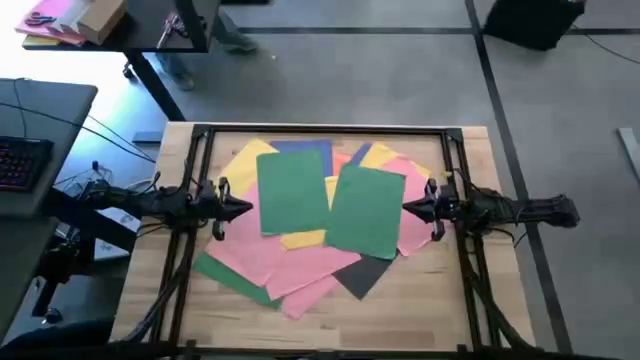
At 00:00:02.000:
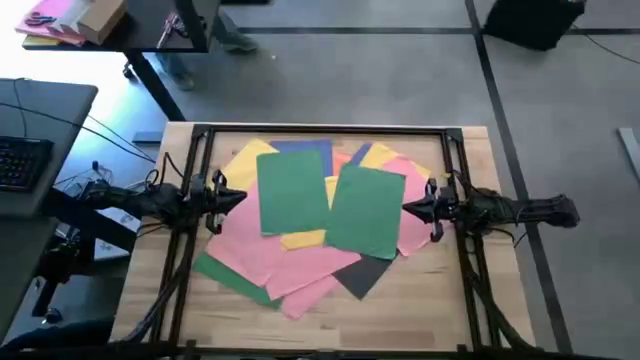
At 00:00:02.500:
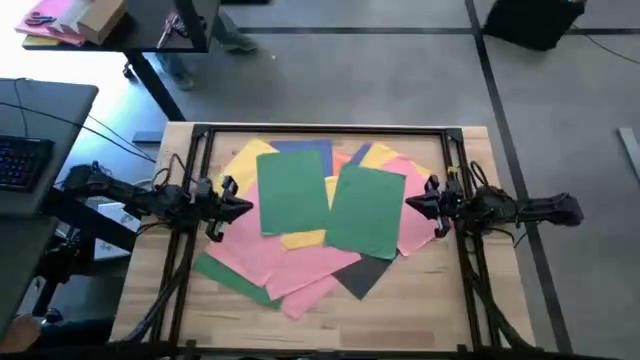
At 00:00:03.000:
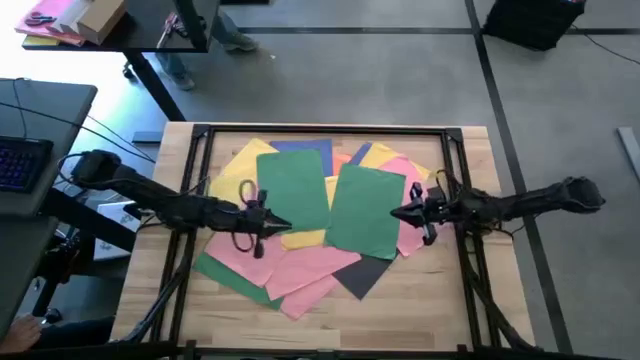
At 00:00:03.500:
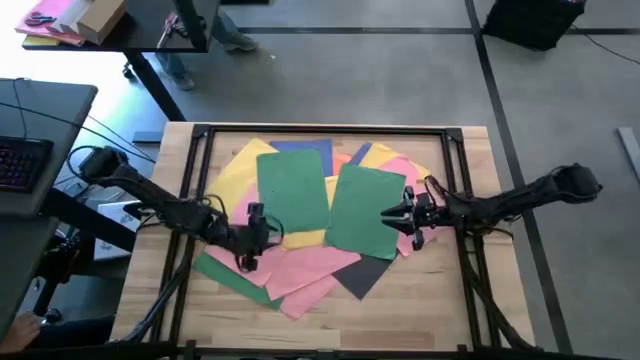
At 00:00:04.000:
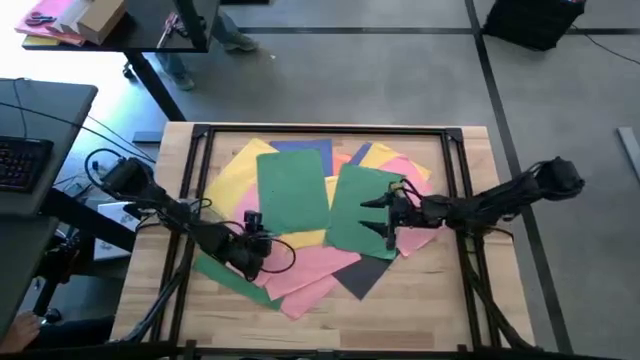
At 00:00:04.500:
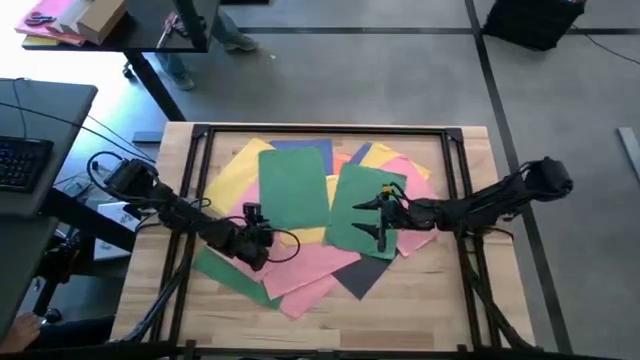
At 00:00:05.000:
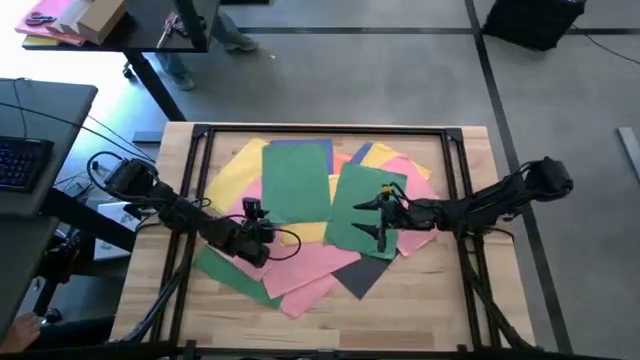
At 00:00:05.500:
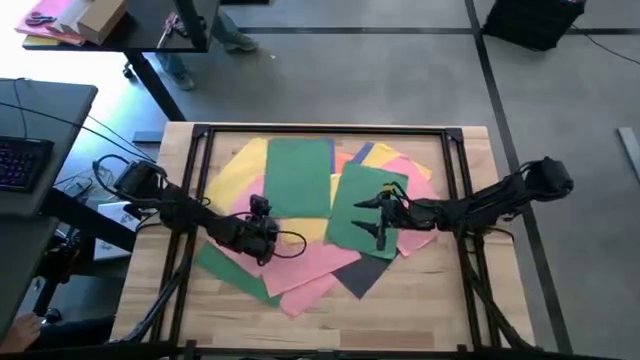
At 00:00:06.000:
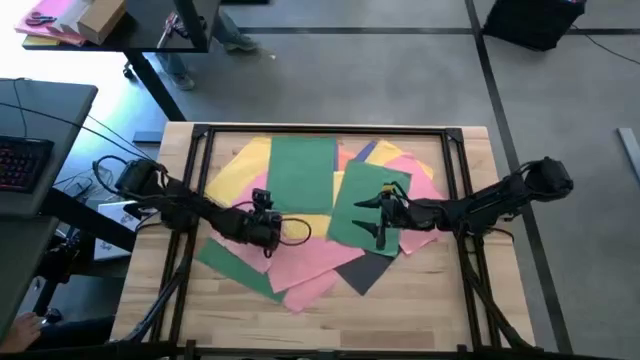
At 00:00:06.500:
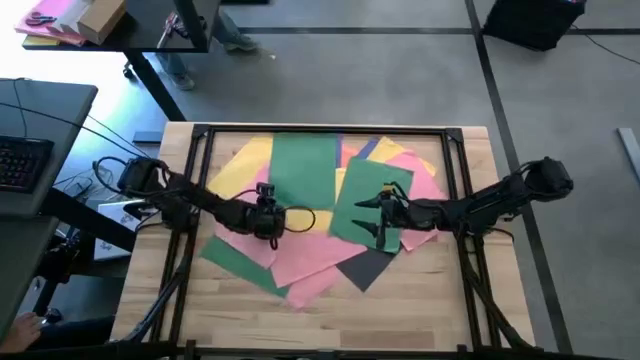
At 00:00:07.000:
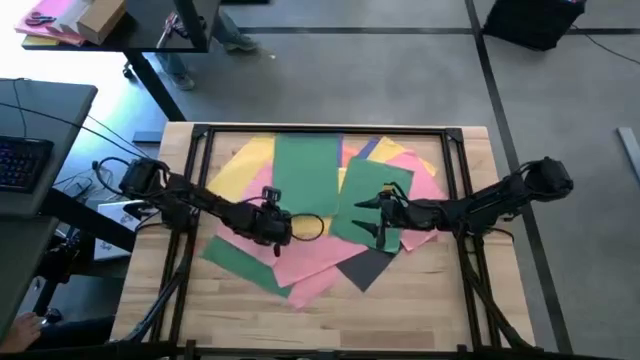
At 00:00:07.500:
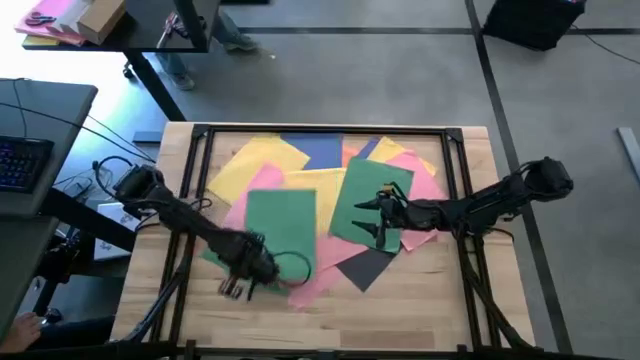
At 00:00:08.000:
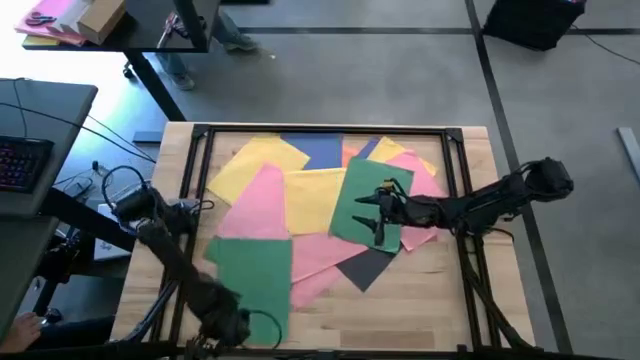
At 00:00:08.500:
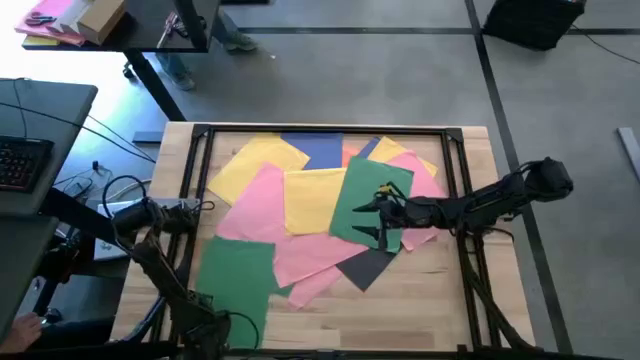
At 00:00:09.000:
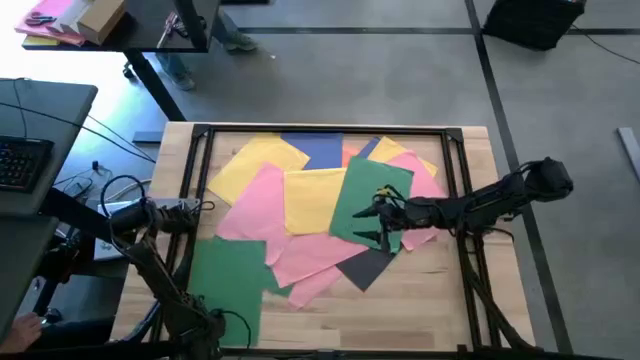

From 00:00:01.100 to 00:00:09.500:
Task: Organize paper
Move the green paper to the bottom left of the table

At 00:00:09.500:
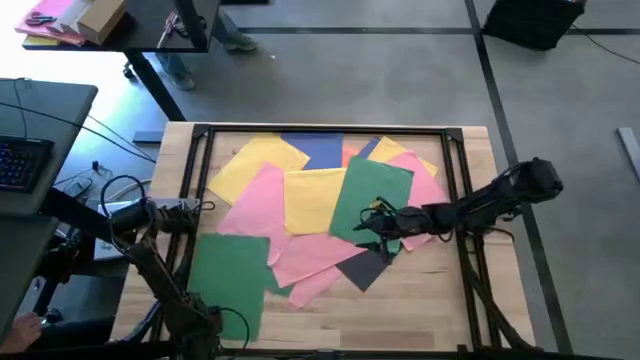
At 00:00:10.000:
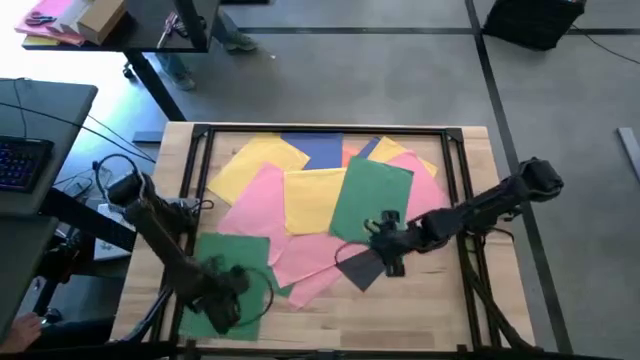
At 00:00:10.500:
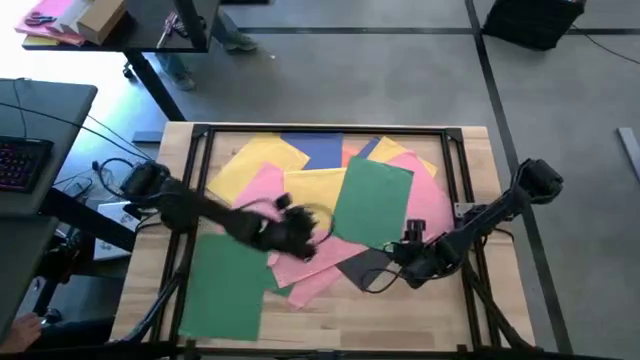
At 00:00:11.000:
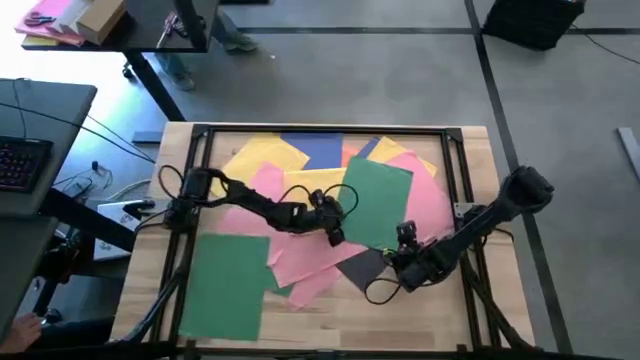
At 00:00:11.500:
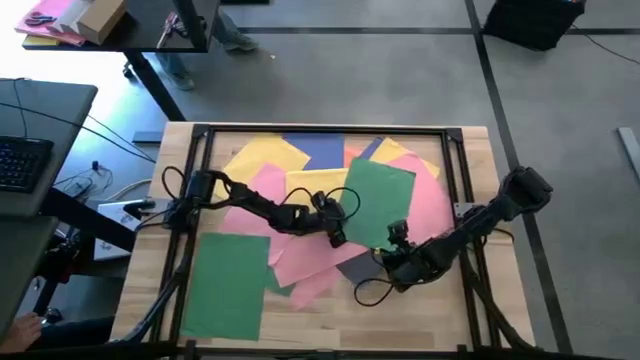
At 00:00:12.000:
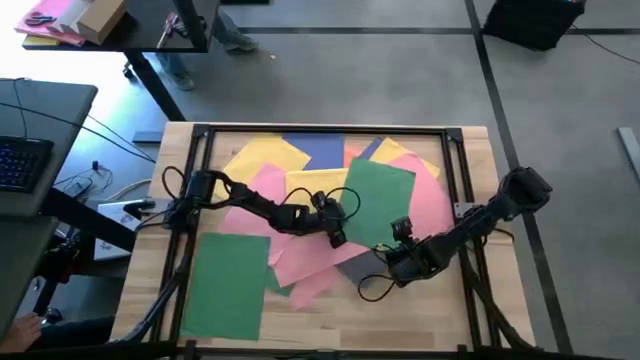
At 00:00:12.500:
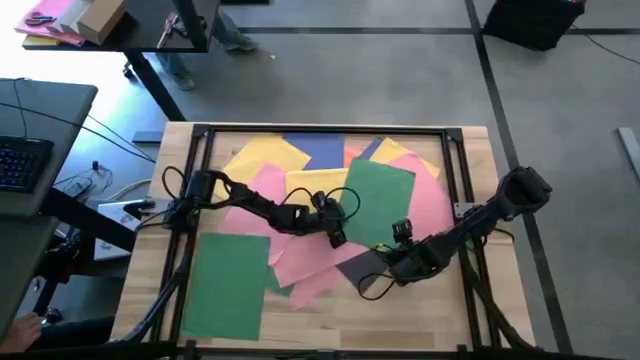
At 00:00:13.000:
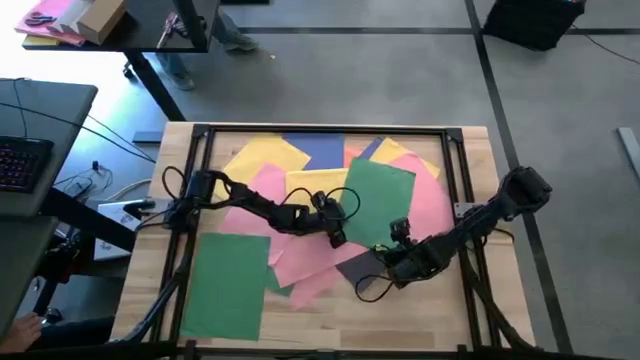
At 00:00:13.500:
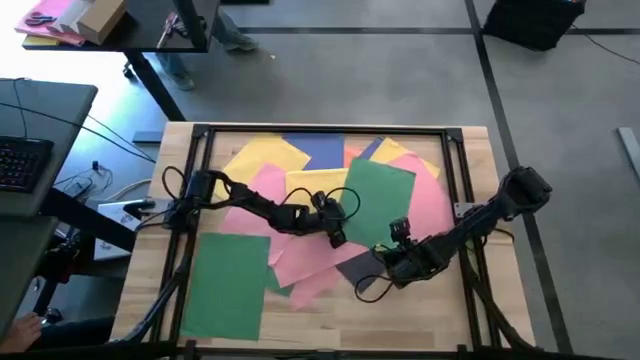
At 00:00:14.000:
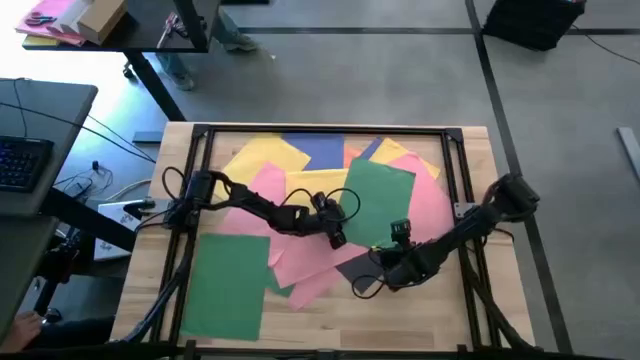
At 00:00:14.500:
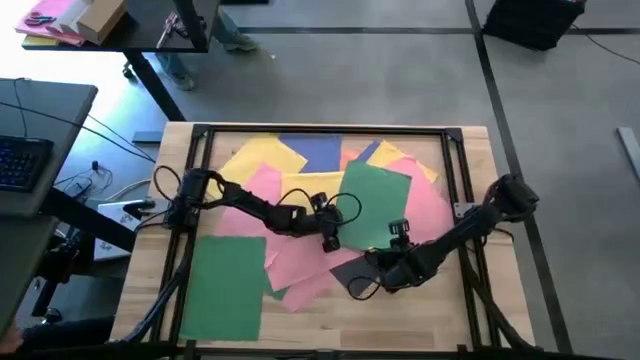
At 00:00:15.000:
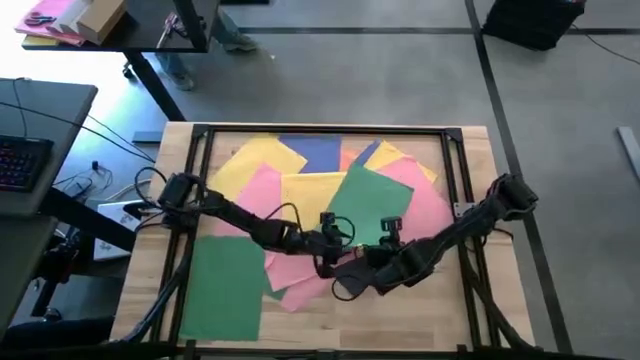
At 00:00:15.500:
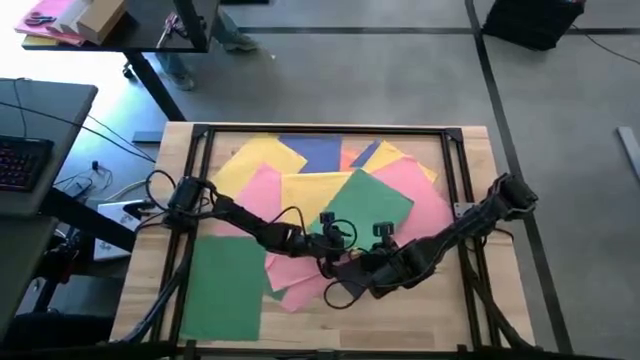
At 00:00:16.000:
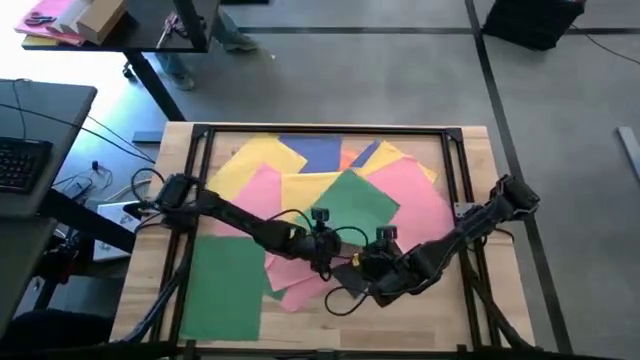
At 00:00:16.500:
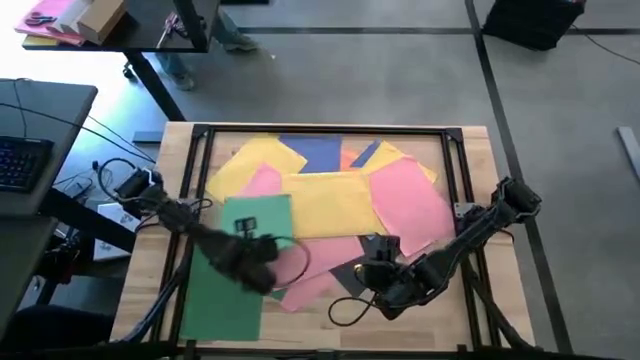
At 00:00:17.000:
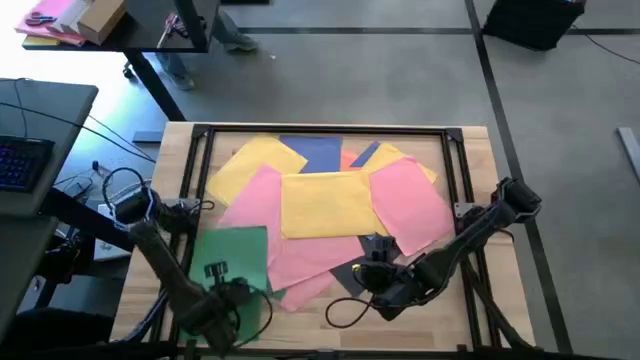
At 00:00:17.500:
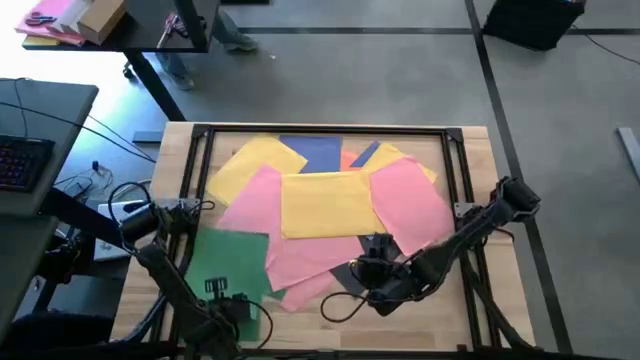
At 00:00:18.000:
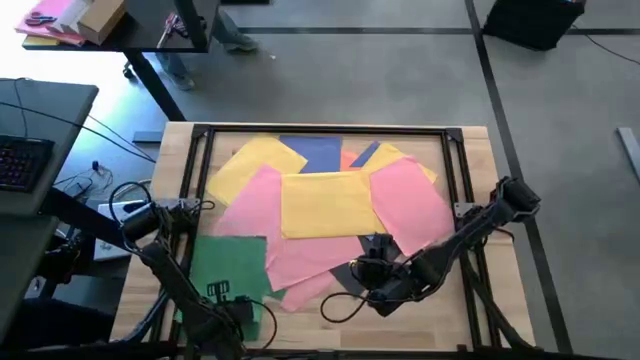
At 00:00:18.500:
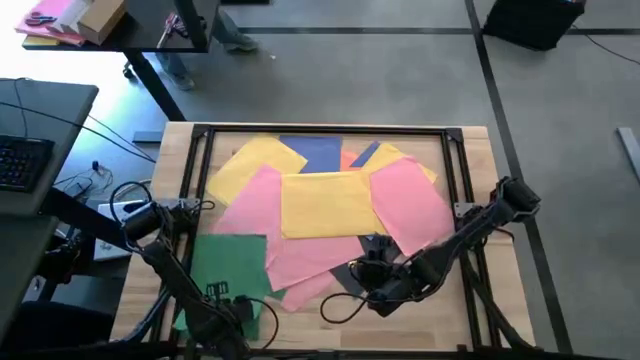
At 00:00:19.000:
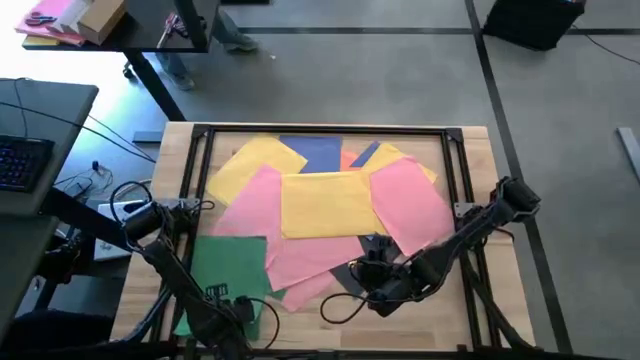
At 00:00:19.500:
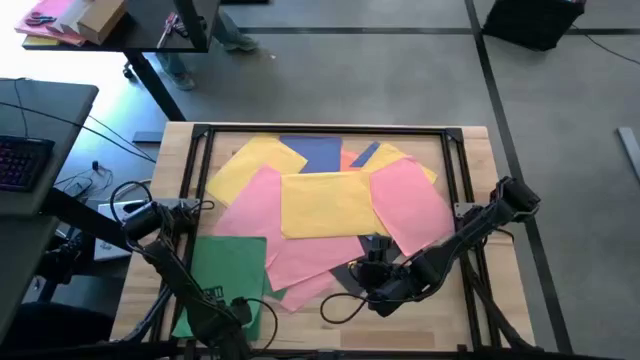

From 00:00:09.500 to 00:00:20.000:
Stack the green paper on top of the other green paper to the bottom left of the table
